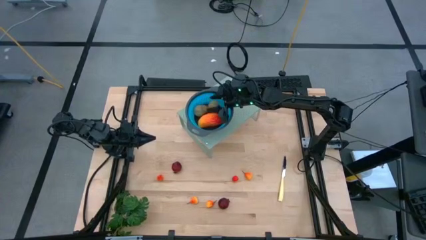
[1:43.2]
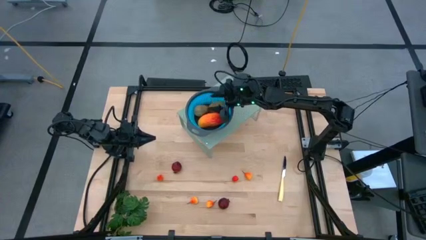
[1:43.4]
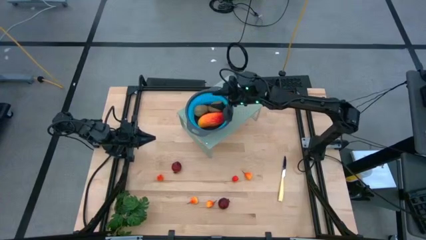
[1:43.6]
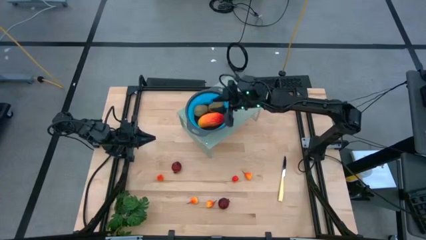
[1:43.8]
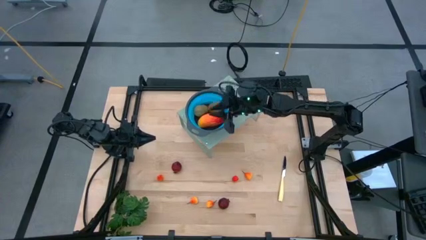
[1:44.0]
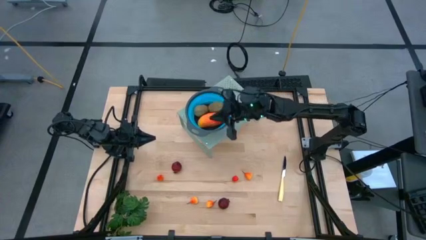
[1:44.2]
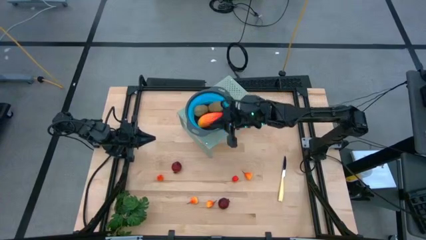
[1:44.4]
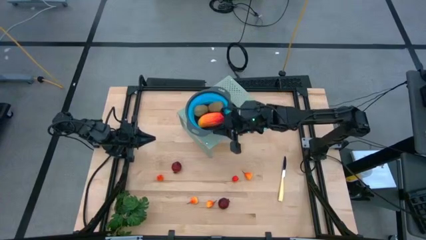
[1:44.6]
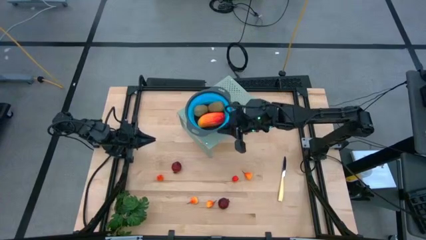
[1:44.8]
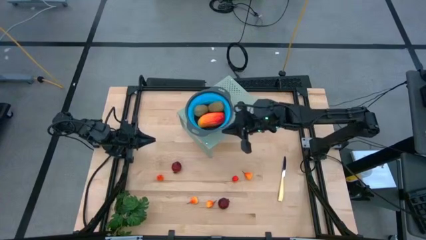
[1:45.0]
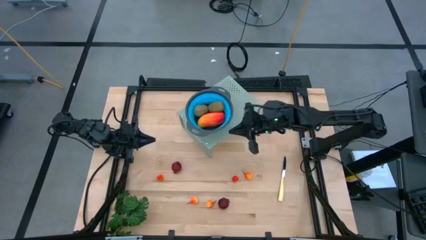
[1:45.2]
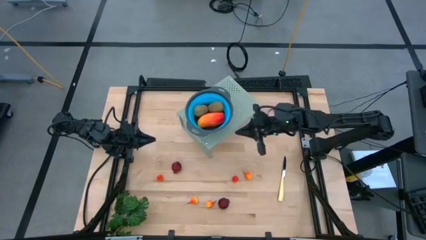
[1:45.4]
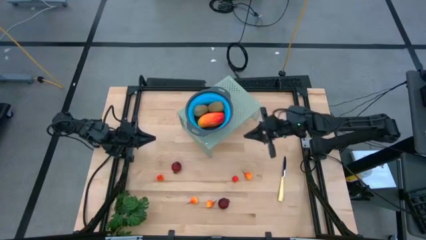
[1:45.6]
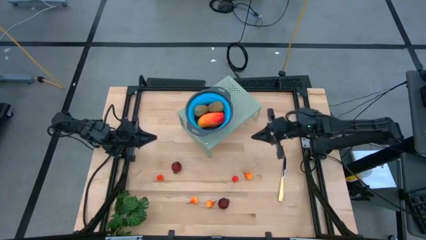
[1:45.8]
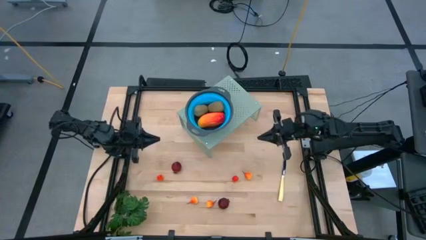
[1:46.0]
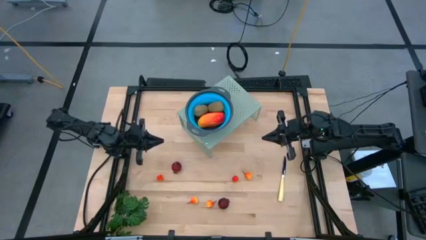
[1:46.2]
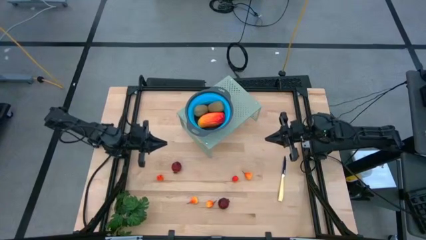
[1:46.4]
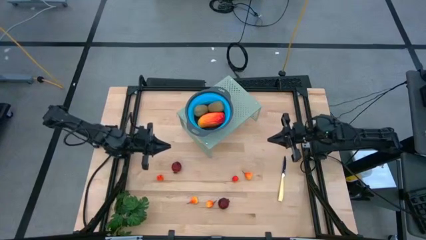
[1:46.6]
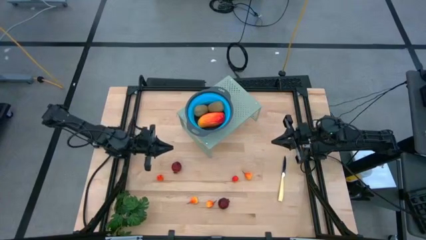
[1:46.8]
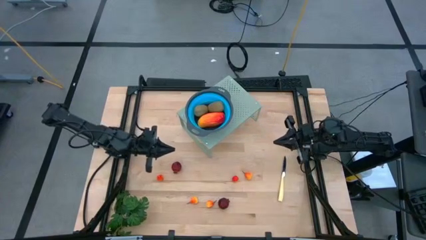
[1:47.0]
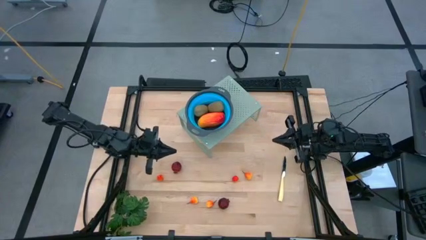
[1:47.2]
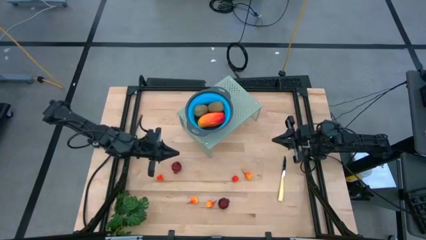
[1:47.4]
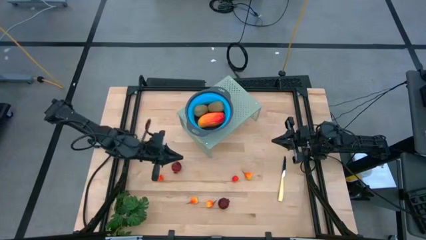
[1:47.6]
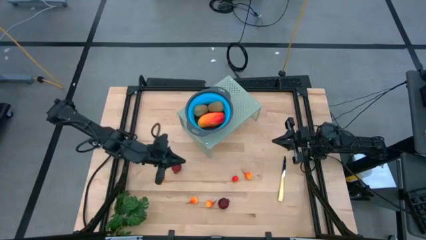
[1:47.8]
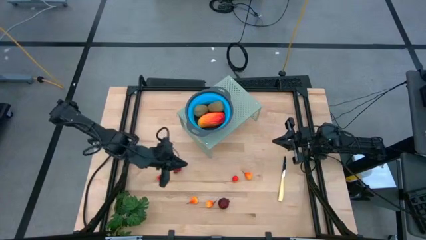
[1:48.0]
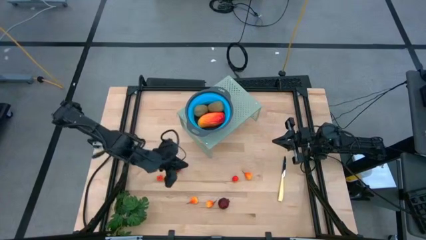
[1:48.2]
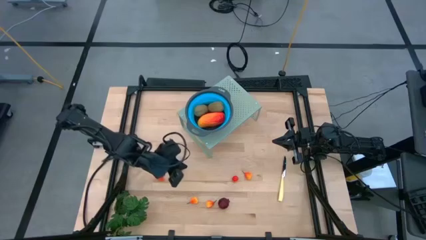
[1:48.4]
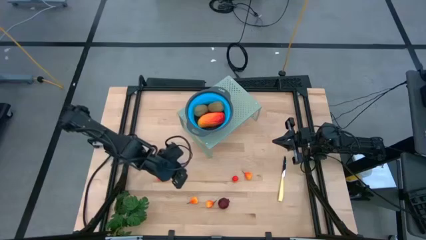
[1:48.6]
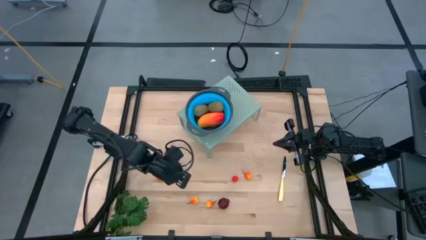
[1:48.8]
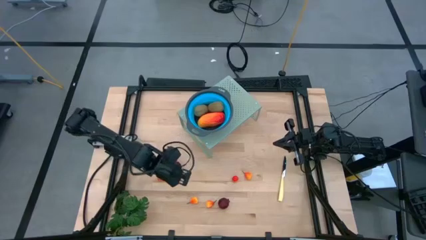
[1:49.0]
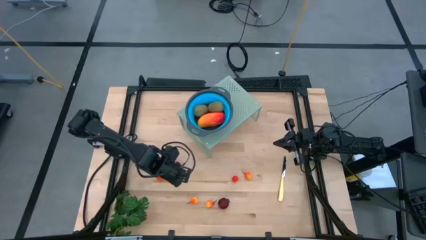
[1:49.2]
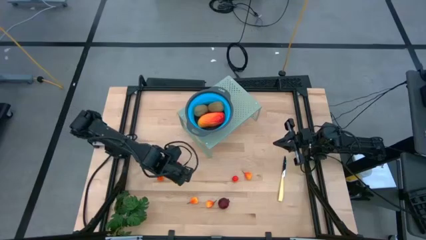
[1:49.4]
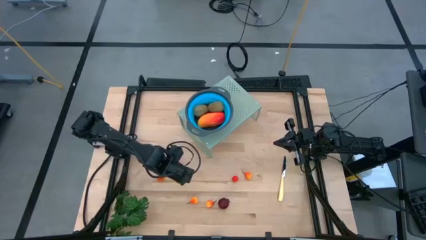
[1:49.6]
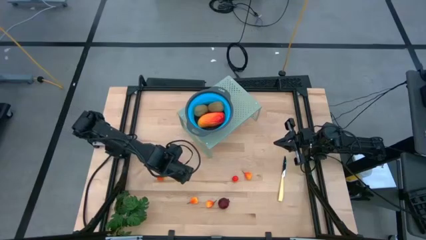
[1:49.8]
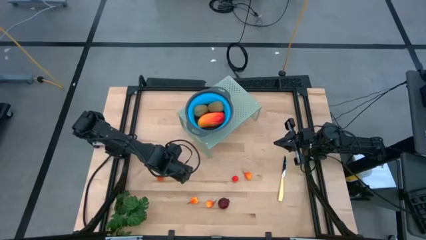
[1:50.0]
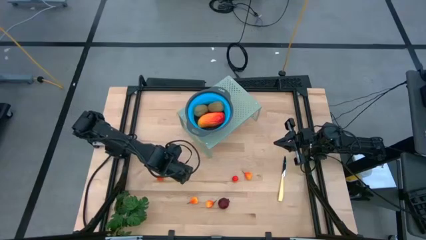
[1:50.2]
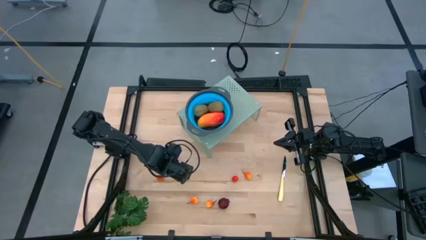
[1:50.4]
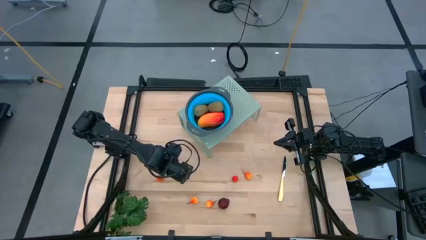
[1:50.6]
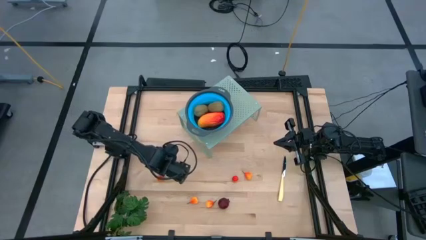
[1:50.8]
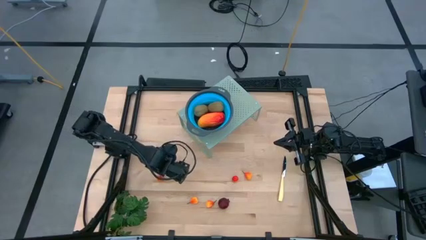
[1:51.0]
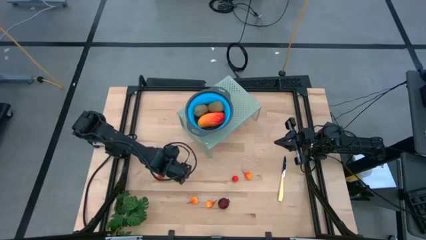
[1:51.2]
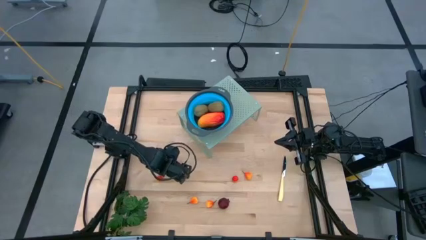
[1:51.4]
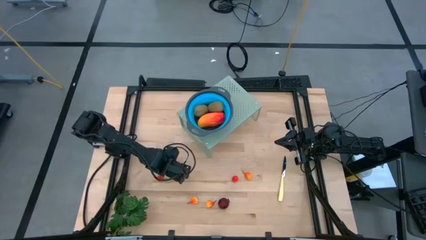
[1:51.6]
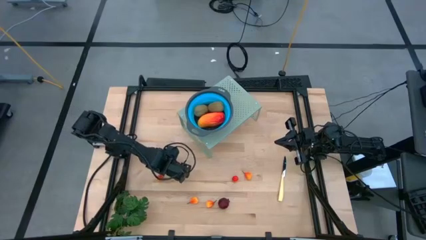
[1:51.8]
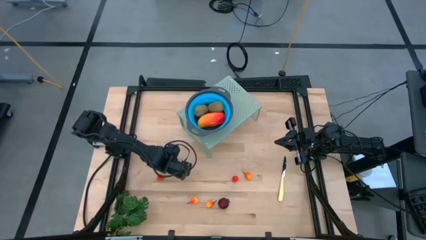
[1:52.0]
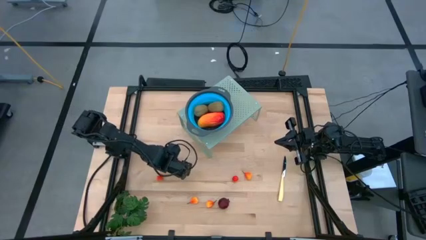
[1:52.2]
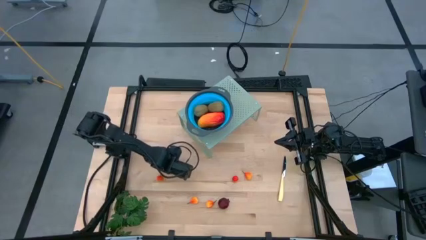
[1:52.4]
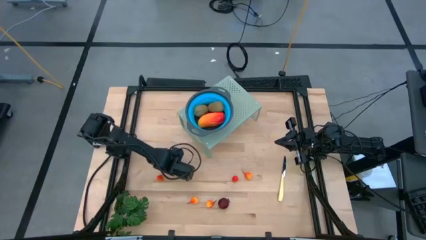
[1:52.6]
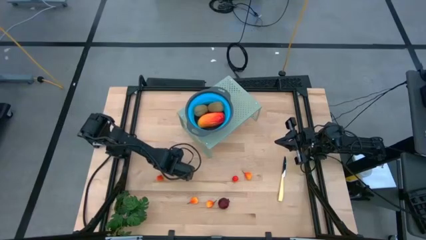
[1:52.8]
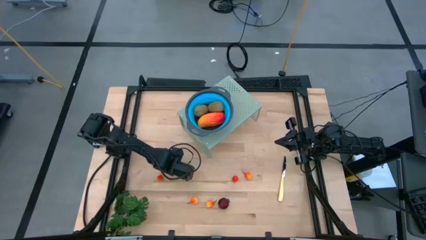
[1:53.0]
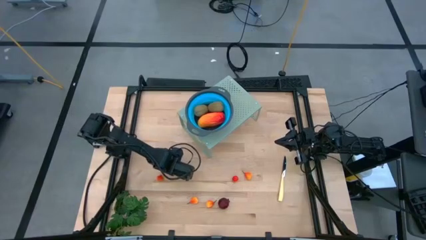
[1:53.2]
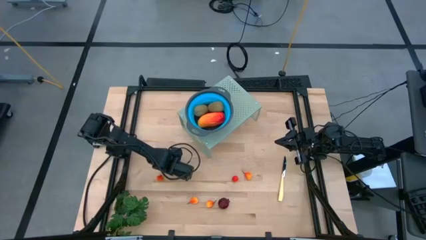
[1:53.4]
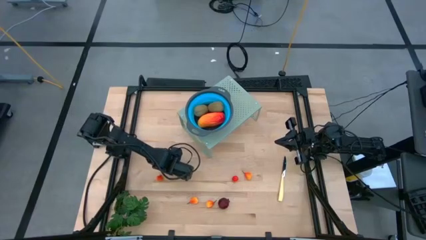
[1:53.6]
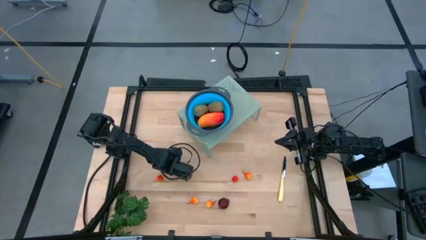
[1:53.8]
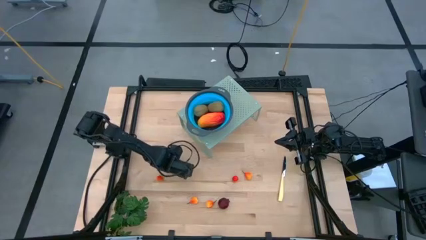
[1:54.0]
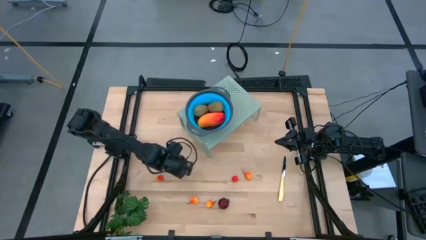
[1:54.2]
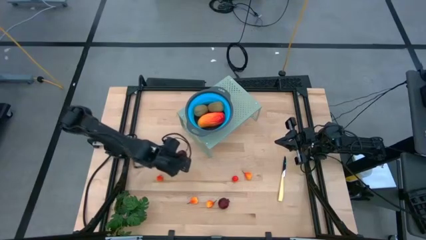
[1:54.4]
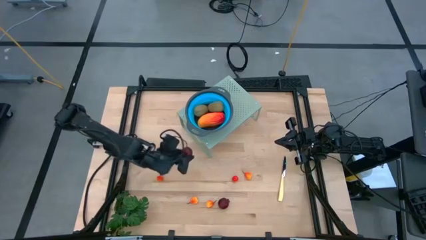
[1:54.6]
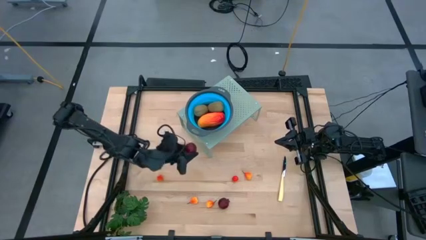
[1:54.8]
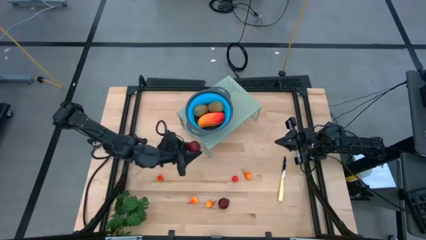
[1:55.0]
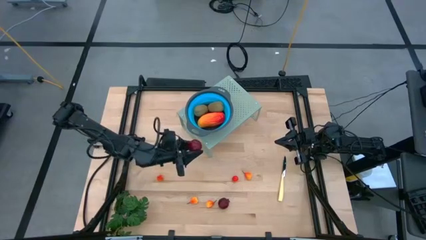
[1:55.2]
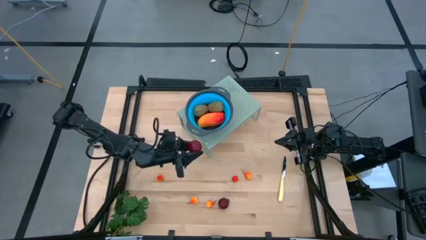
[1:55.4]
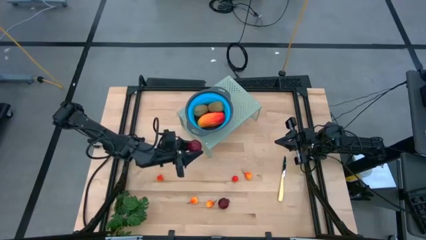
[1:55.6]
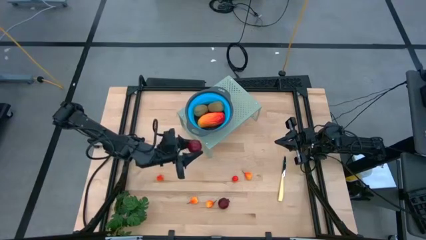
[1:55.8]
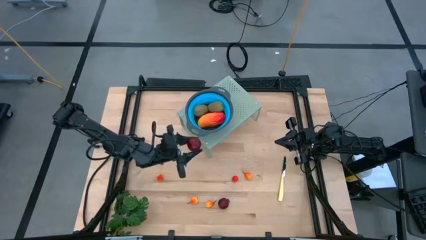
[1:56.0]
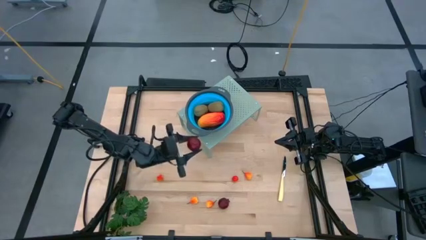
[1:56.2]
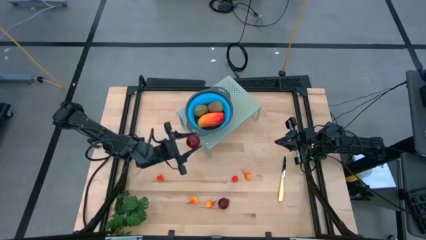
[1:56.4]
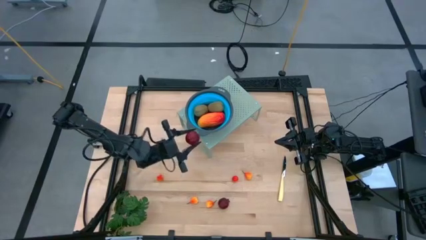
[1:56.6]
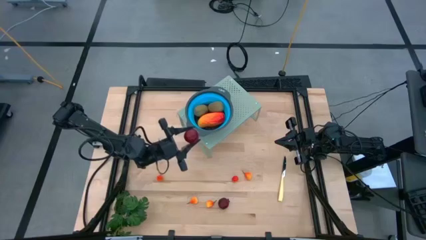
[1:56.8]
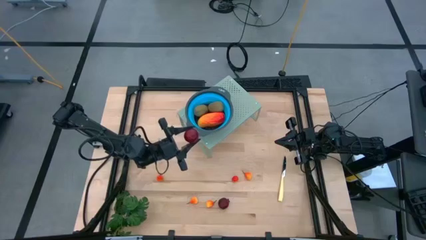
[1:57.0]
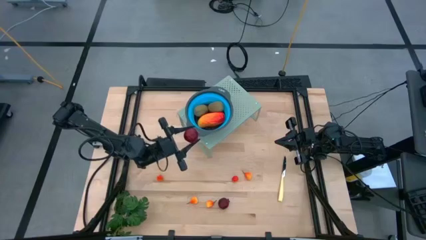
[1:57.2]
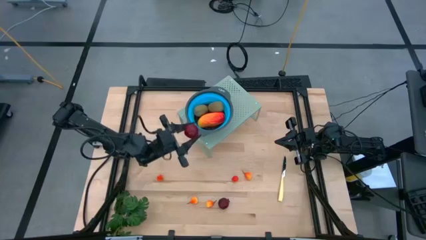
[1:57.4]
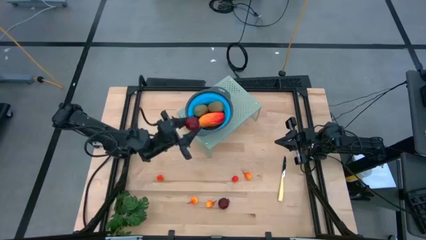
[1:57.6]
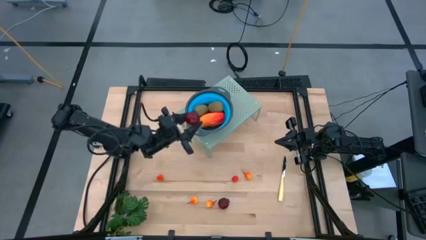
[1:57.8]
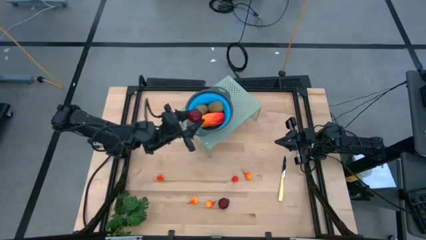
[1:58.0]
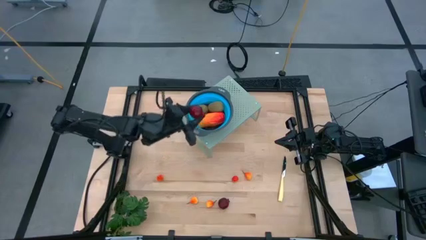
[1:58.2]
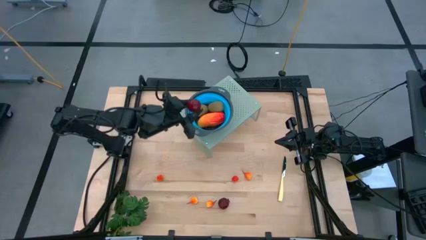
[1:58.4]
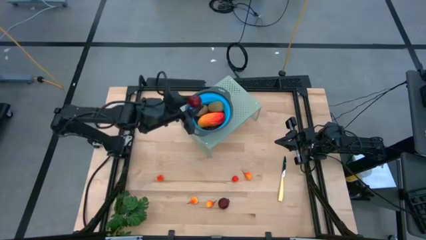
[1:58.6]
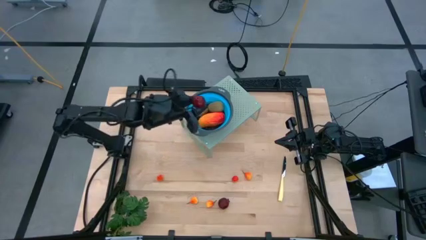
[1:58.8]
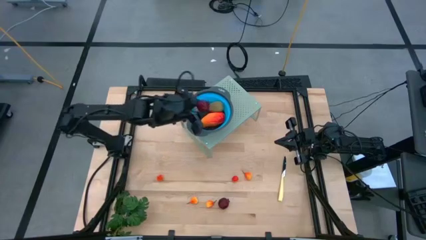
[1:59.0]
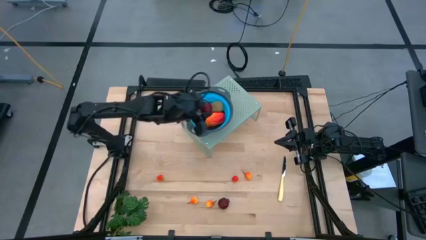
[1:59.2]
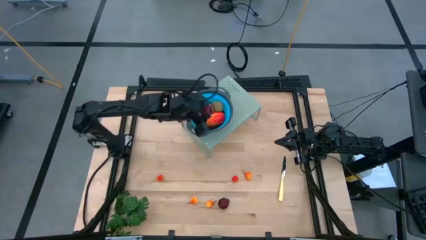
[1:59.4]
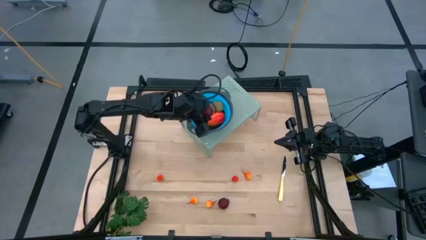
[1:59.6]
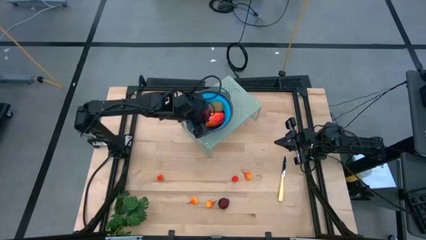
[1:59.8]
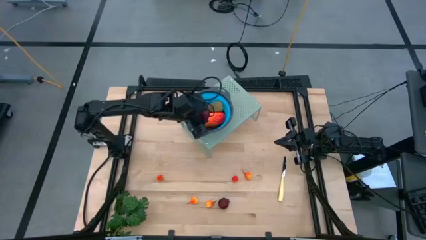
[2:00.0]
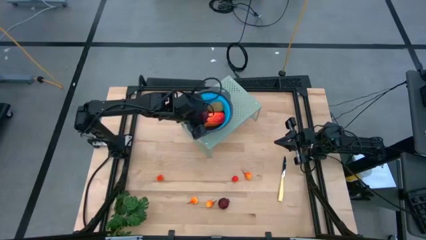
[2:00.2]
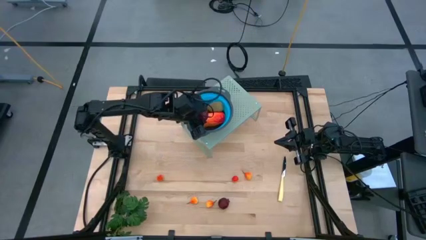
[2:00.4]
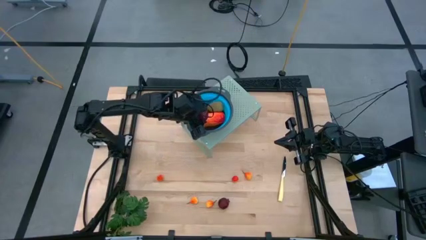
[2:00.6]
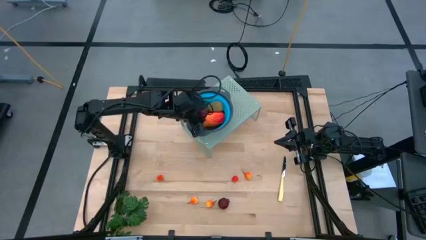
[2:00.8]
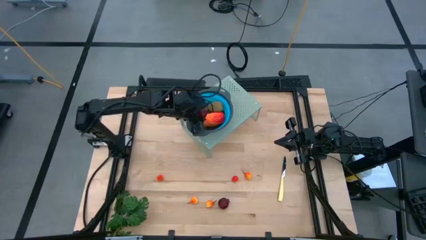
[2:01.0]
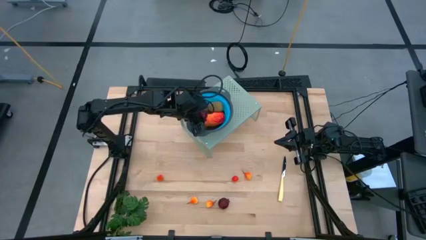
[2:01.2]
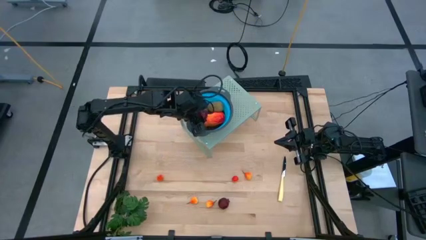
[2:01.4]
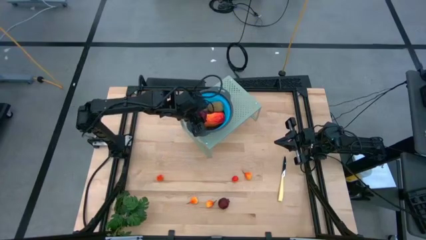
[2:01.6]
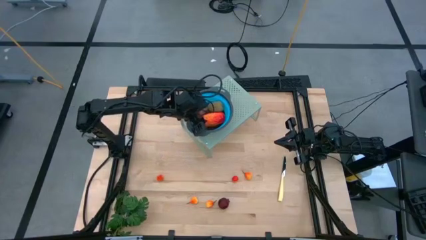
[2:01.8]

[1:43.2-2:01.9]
Task: Pick & Place Fruit
Put the left red pomegranate into the blue strainer bowl on the shelf
